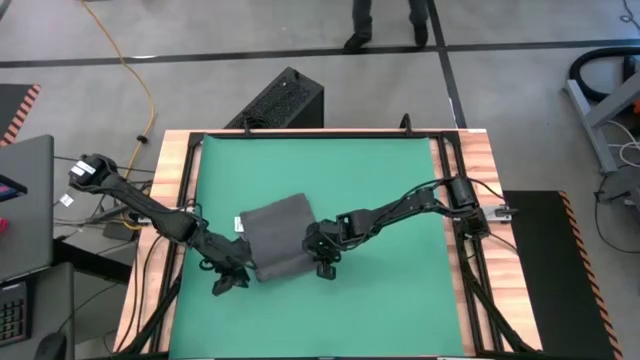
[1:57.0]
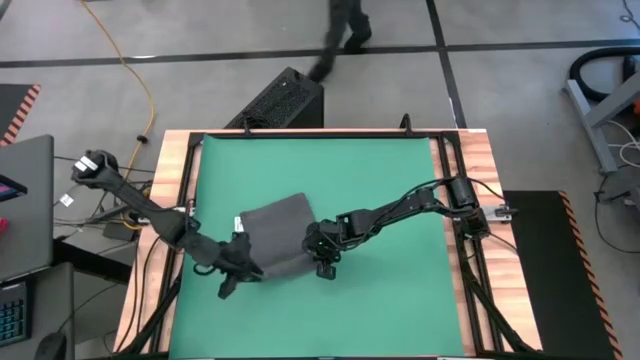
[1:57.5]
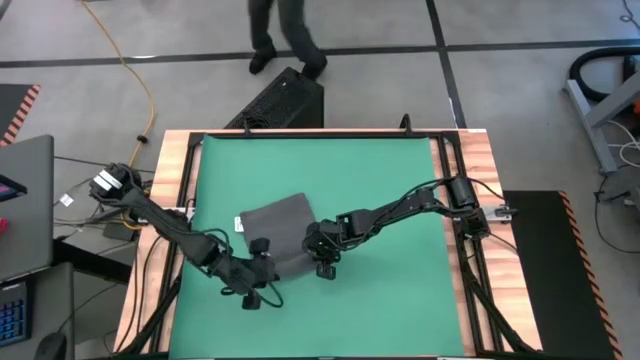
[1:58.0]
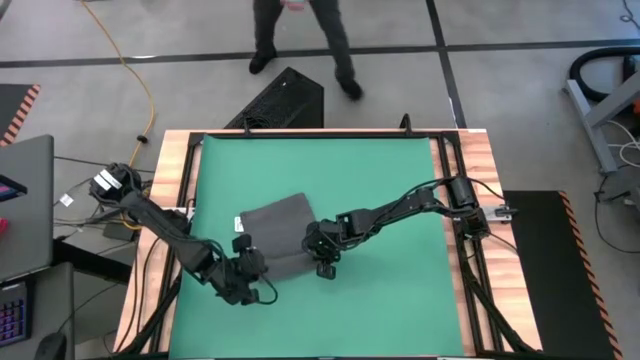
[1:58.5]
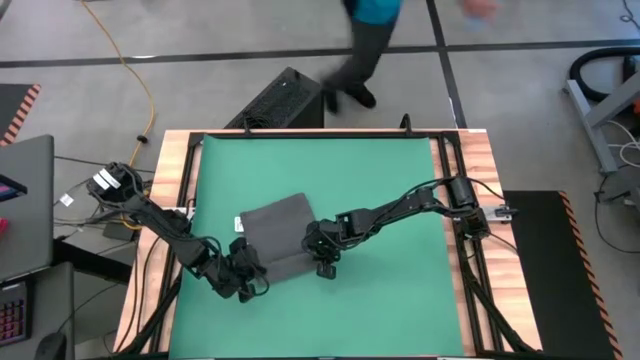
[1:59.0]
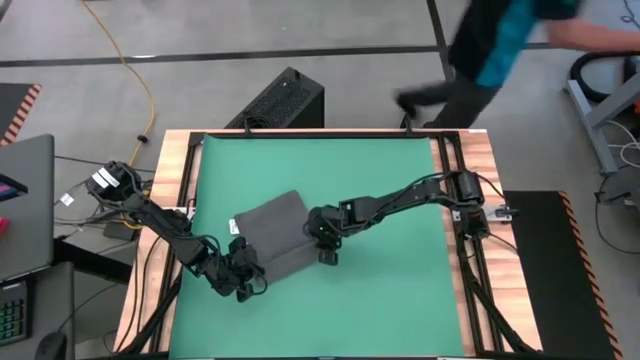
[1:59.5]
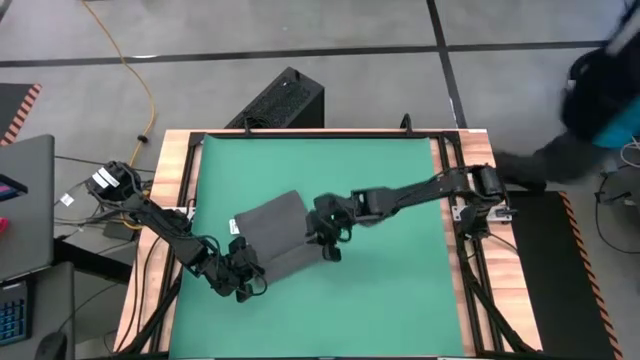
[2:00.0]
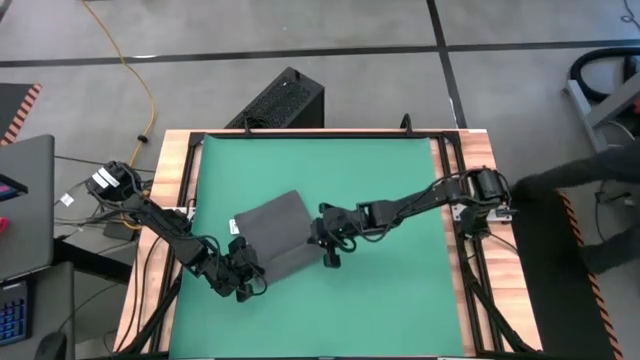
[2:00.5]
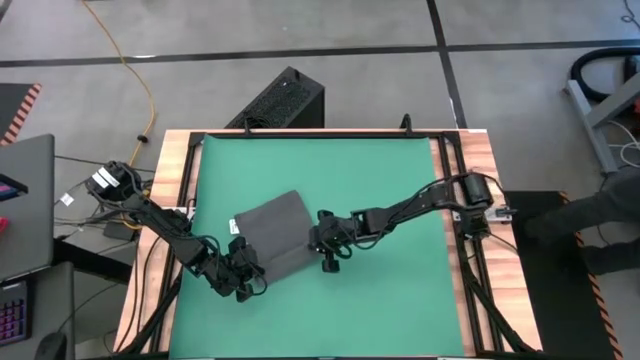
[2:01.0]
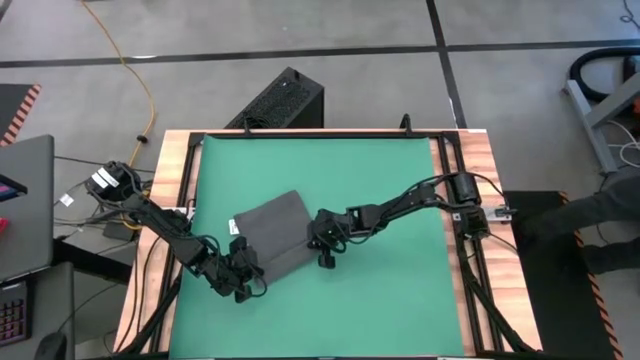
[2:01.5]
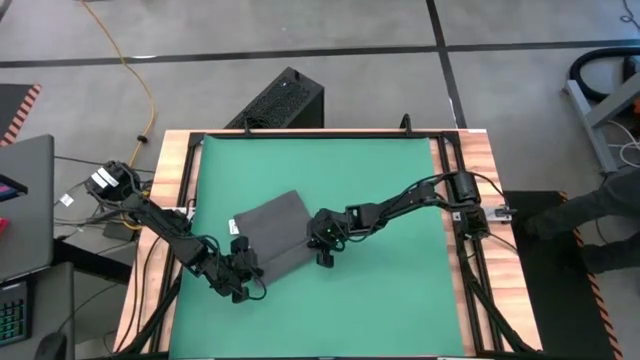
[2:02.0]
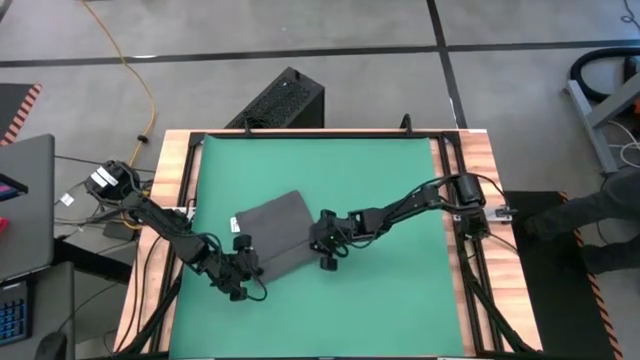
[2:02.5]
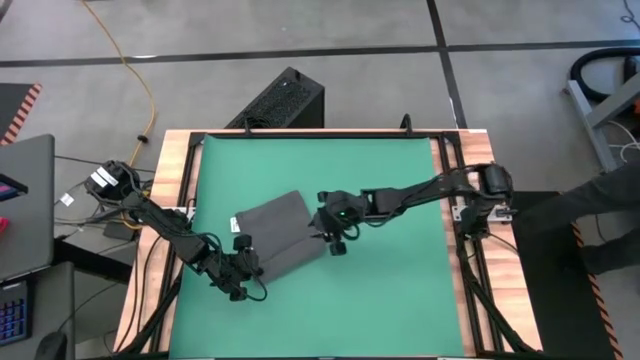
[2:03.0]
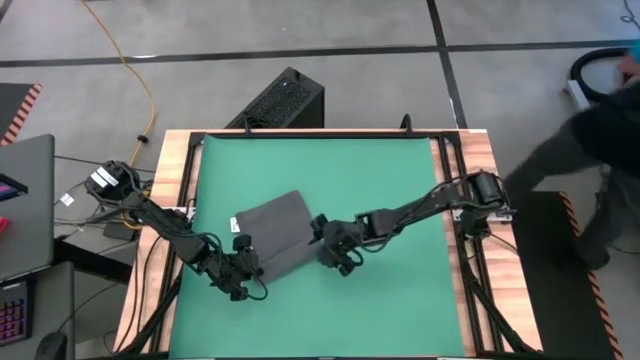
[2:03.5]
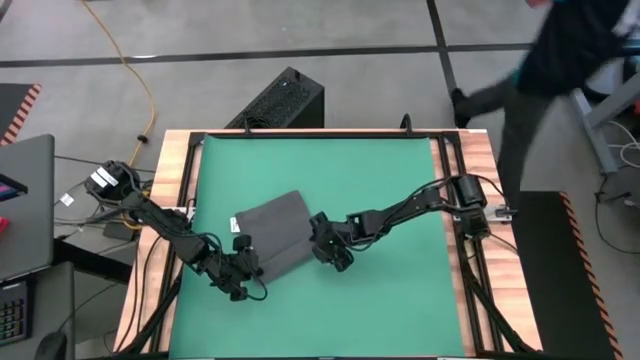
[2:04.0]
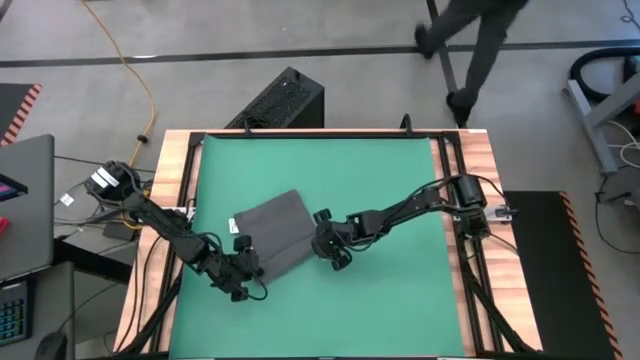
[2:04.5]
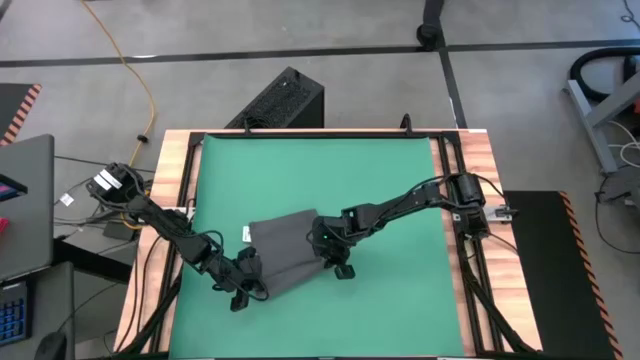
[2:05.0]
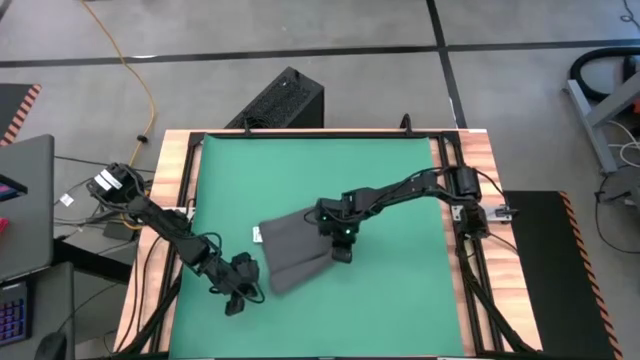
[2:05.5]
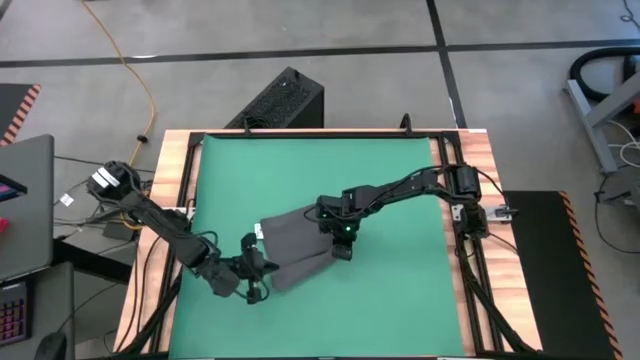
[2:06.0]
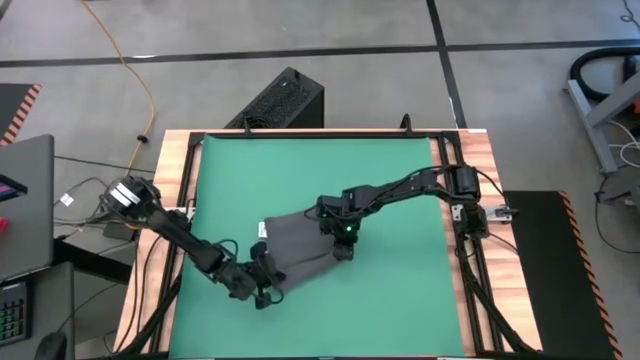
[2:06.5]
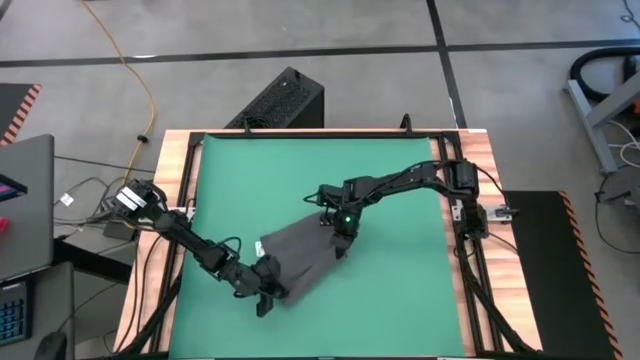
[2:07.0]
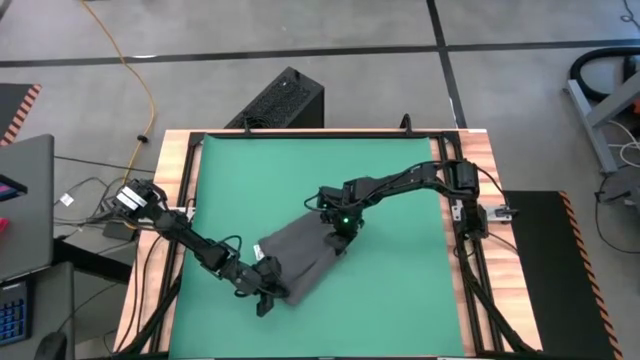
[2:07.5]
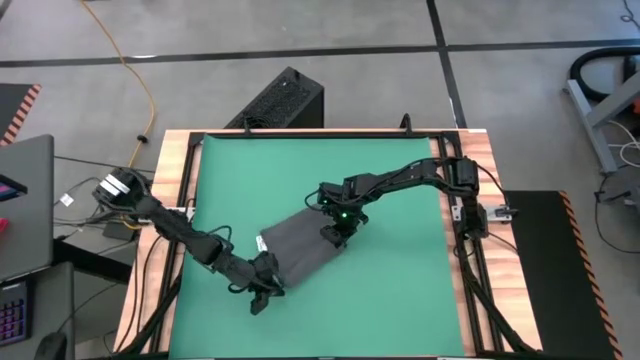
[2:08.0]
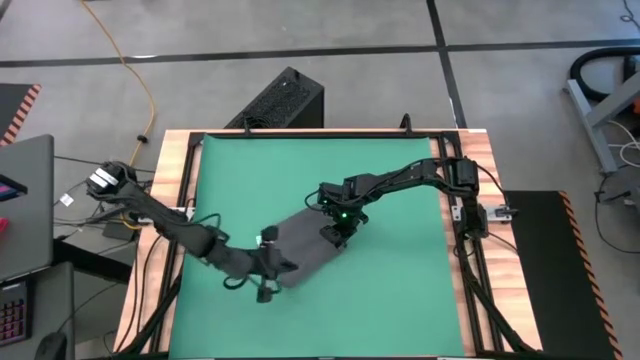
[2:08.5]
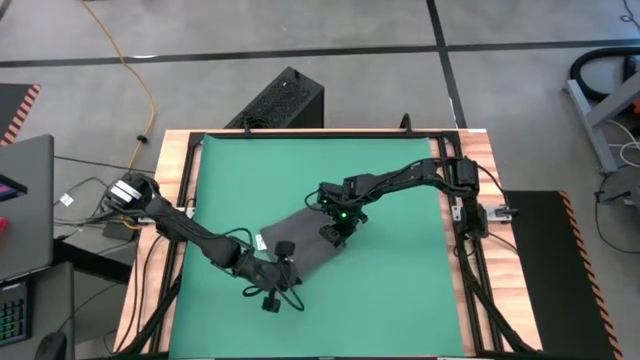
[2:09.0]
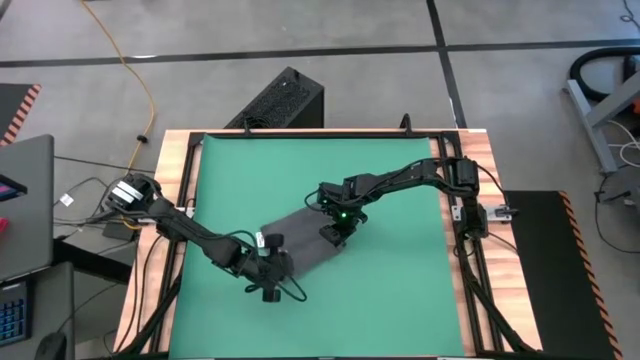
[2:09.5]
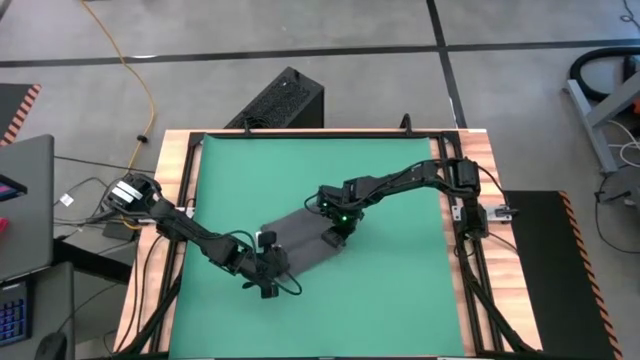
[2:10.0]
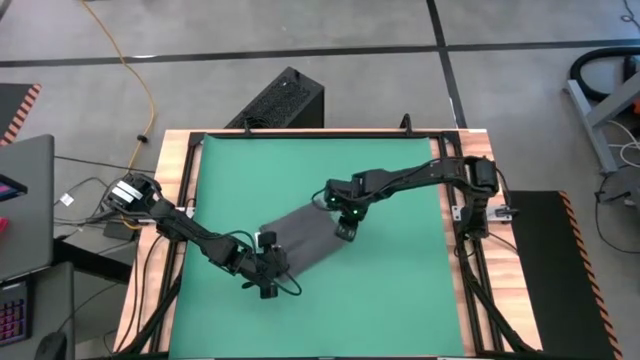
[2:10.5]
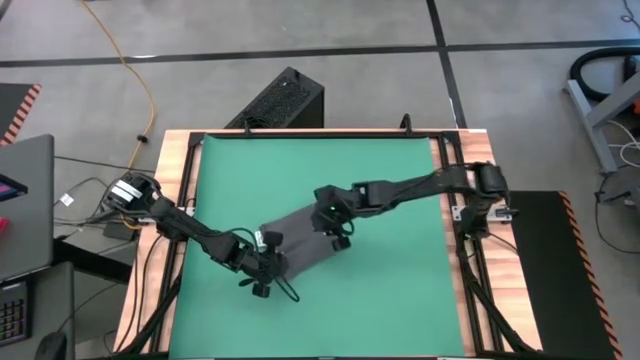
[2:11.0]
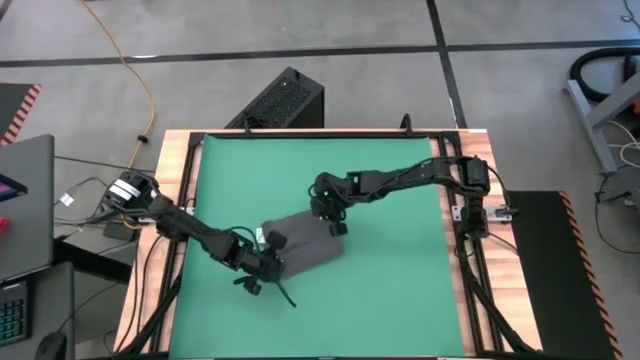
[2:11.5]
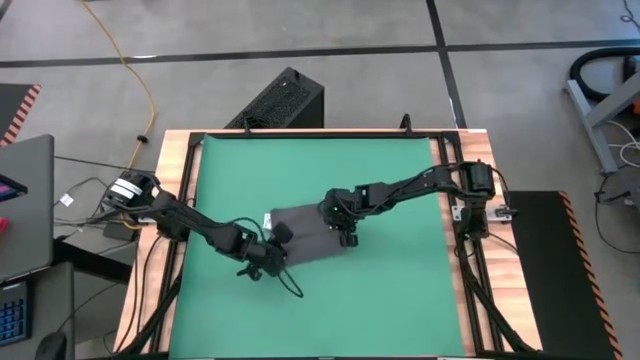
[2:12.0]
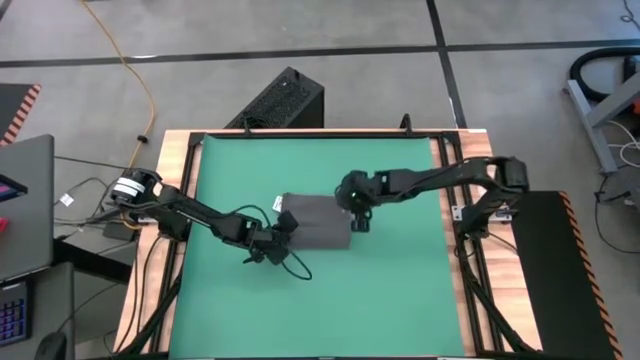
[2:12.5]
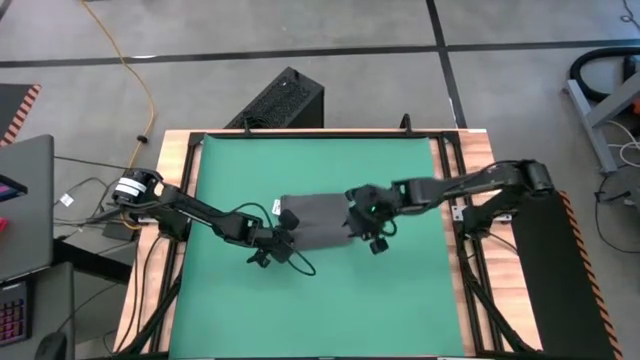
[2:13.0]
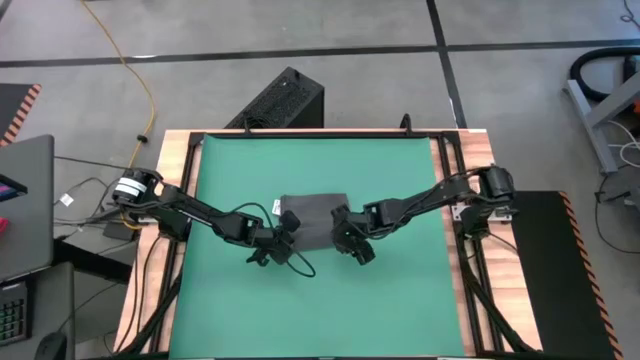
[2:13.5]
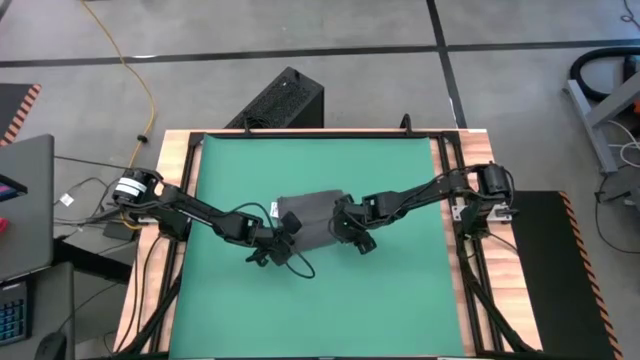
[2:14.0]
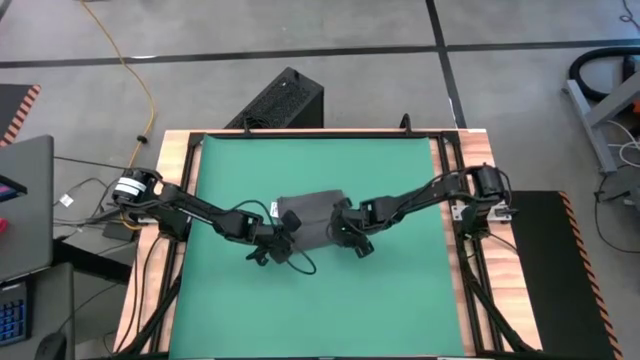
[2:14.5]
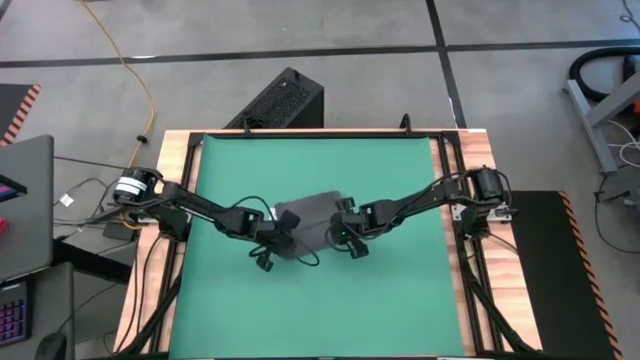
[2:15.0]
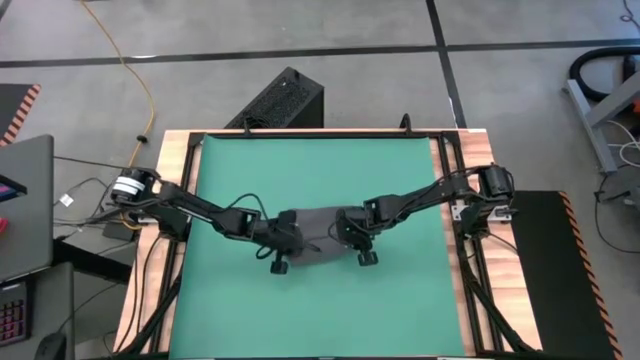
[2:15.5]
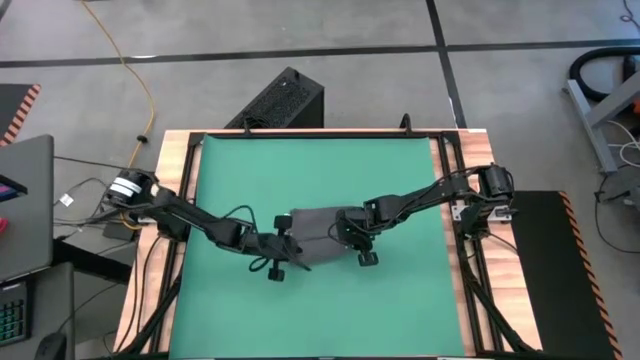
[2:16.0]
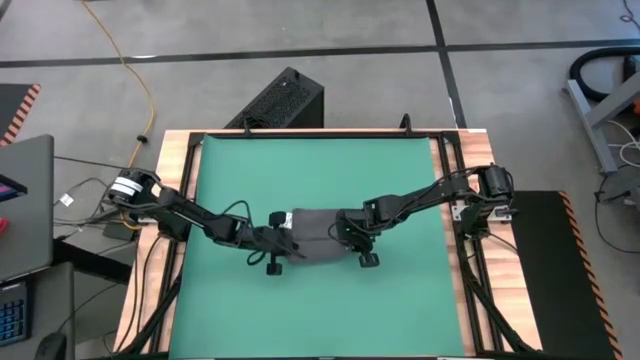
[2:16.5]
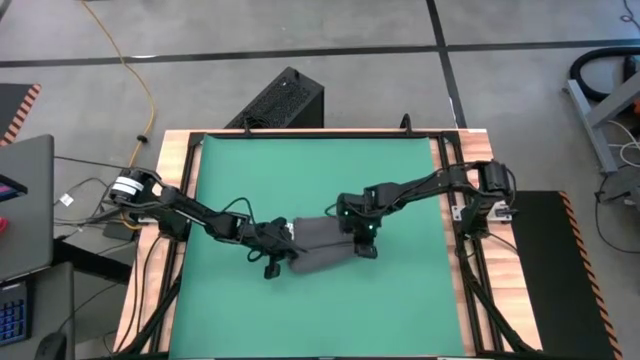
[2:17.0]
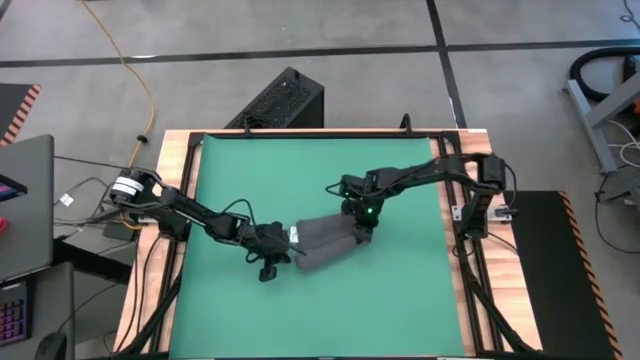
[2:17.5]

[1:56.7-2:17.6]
Task: Roll towel
Roll the gray towel
